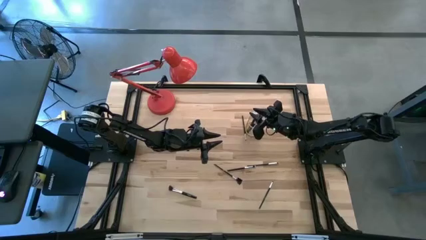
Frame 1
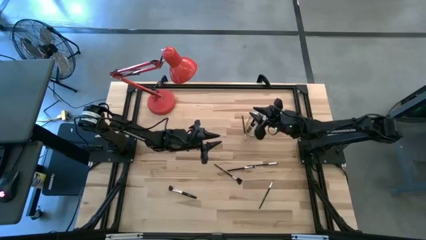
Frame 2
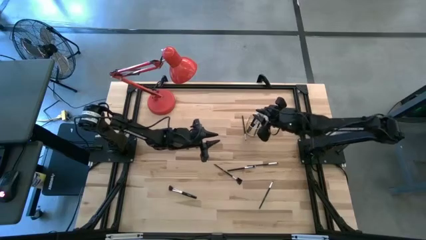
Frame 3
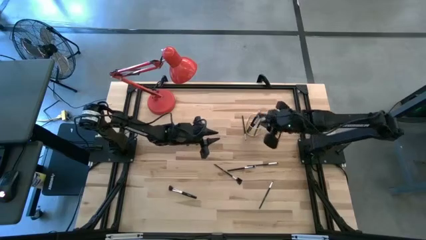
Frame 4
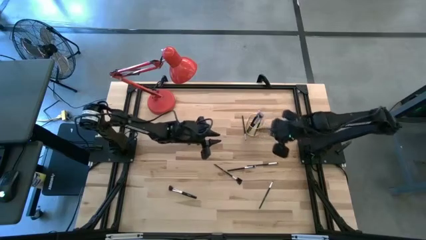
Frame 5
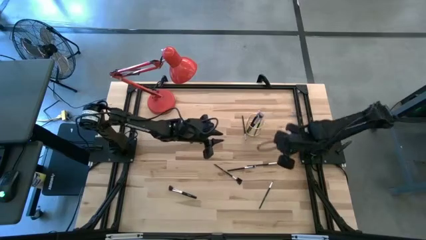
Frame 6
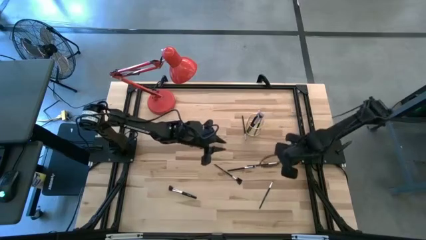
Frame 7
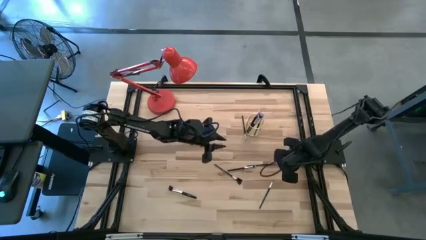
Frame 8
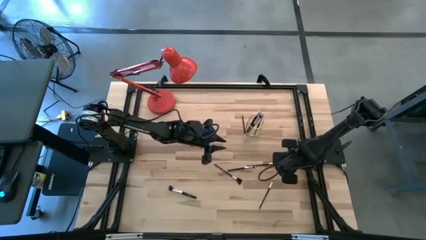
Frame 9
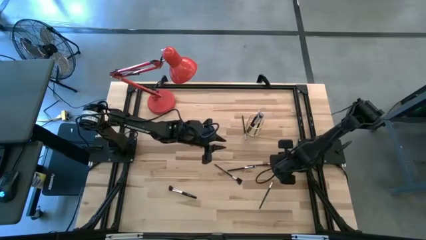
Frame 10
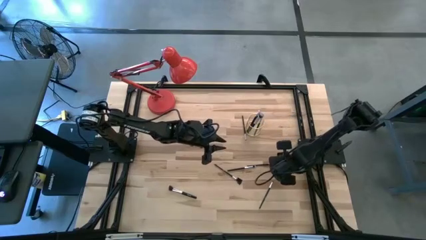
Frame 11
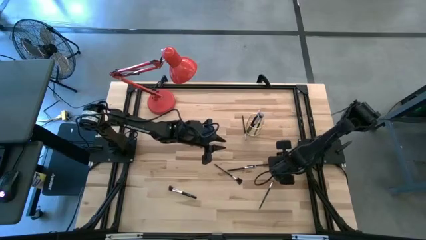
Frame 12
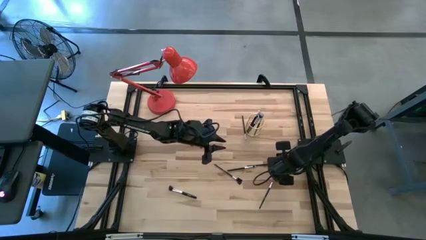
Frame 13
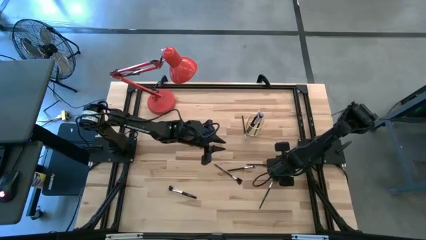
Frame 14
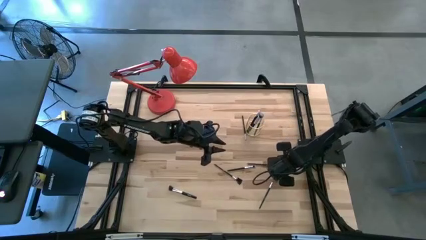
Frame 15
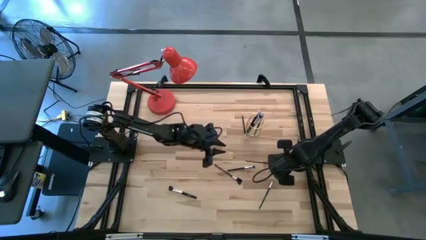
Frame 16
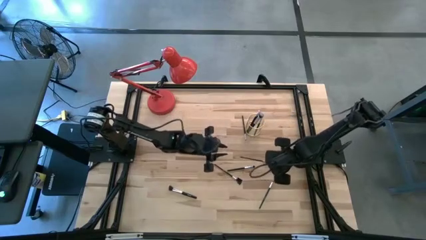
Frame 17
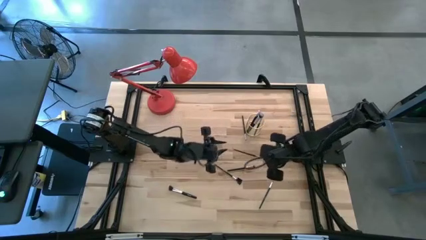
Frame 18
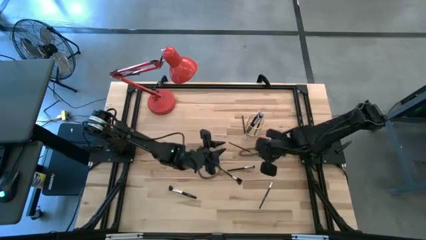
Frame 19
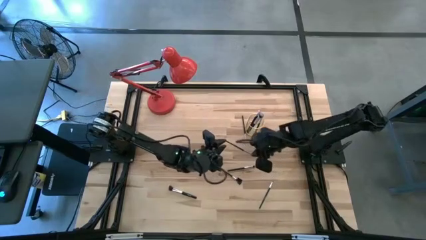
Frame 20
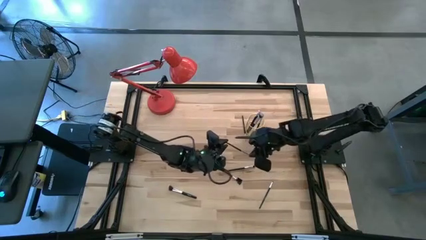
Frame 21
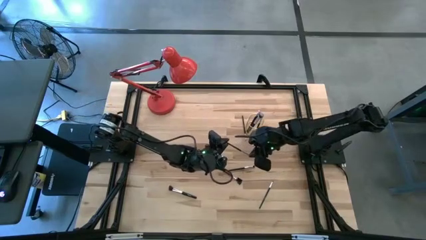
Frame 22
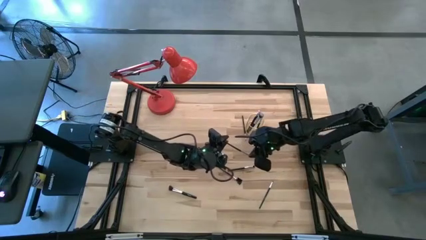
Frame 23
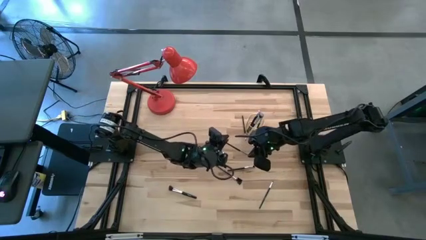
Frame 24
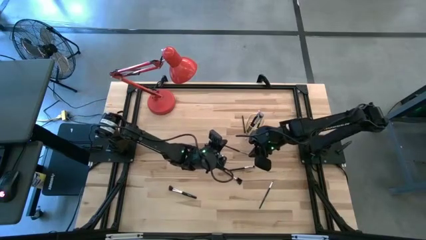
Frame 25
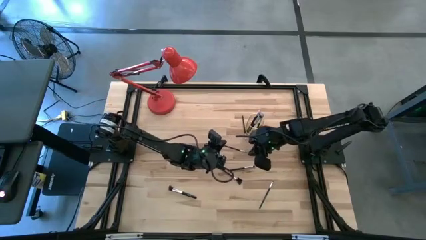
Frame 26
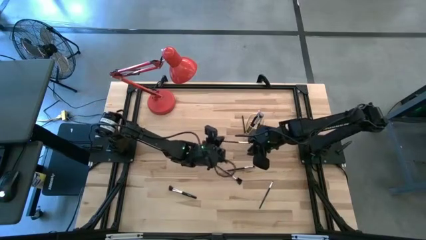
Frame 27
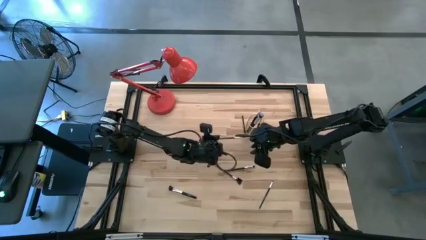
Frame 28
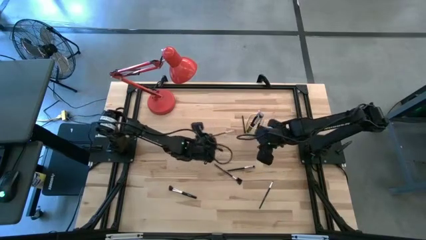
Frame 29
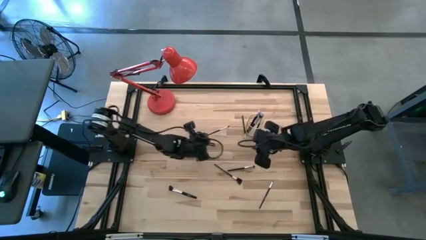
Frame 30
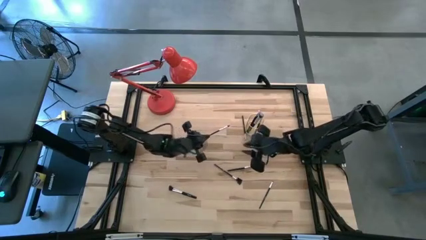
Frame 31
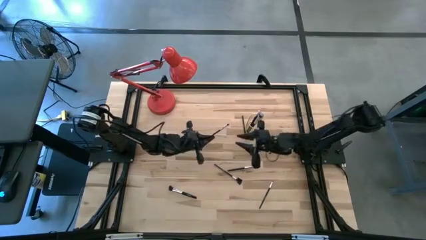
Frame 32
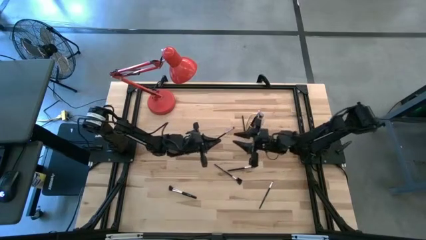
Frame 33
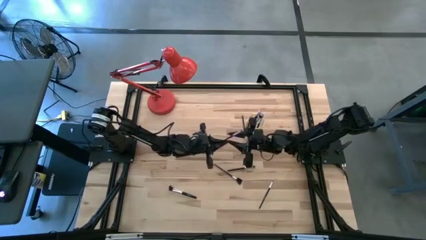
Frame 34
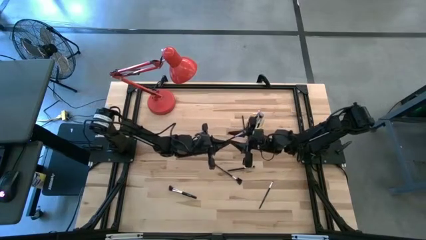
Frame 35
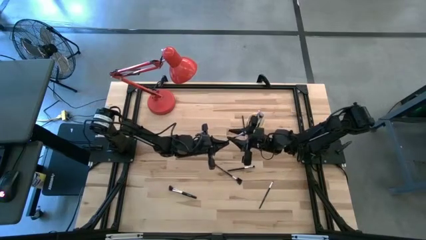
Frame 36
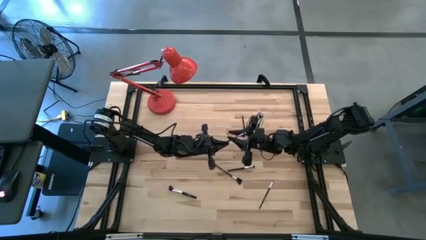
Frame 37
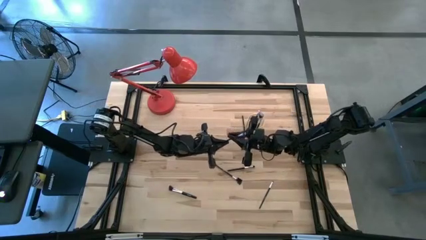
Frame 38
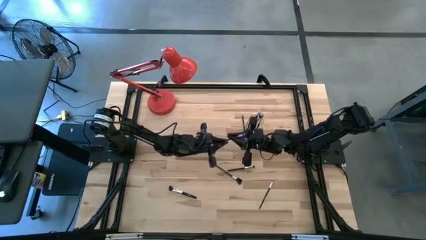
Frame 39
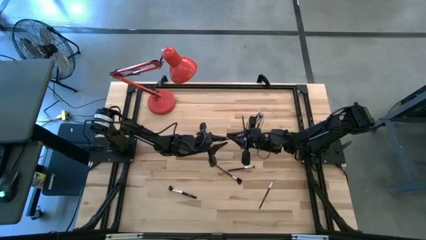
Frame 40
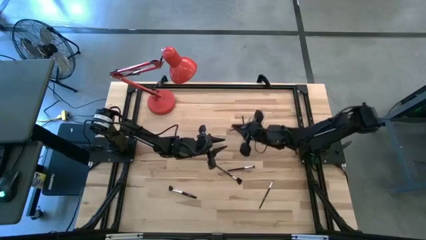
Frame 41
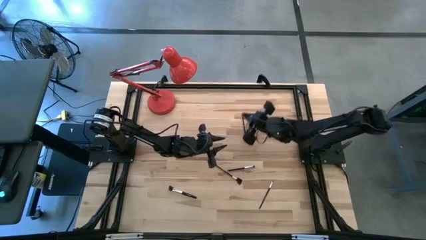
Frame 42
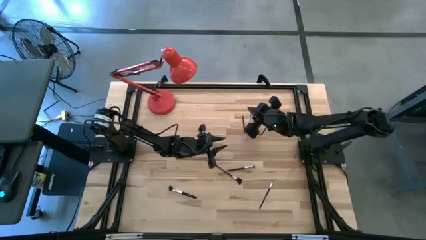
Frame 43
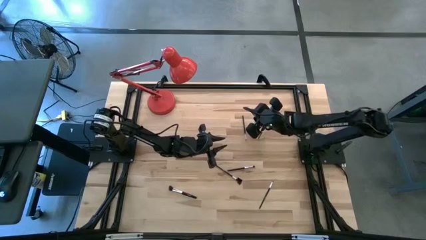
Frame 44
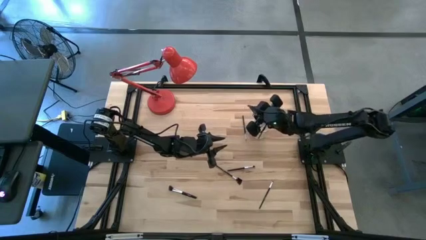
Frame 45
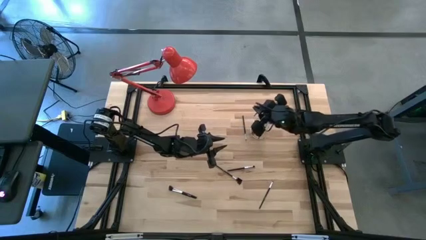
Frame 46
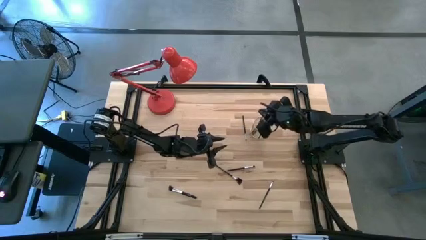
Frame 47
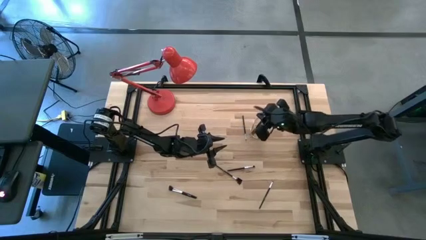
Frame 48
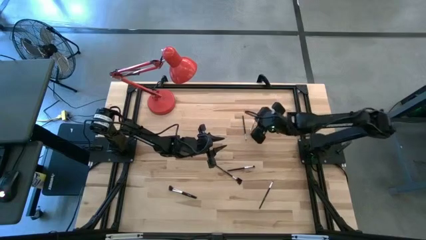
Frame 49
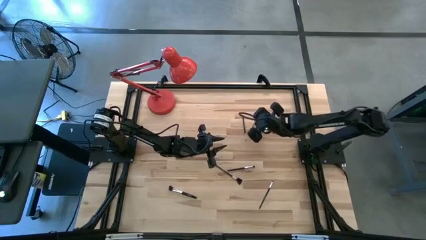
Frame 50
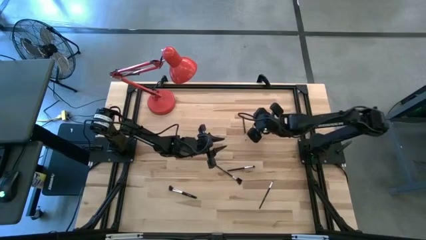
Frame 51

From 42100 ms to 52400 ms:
Task: Put items in baskets/containers
Put the black brush into the gold holder
